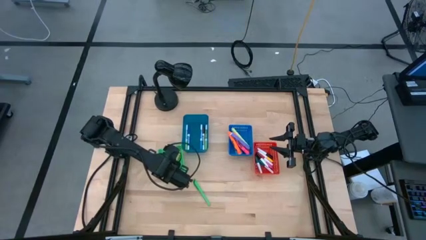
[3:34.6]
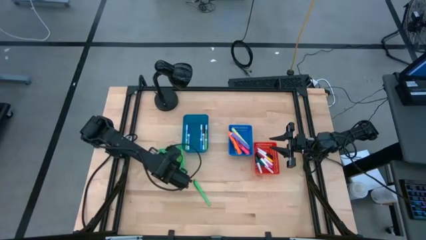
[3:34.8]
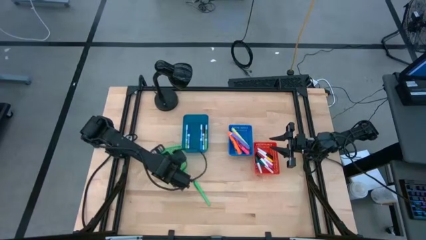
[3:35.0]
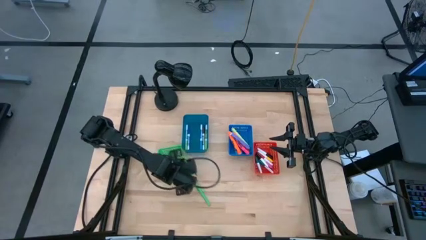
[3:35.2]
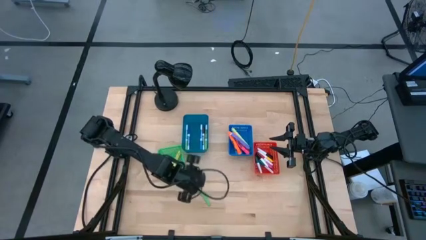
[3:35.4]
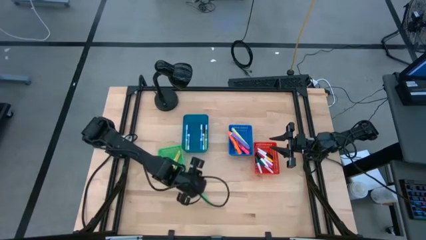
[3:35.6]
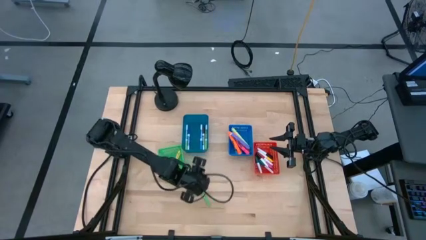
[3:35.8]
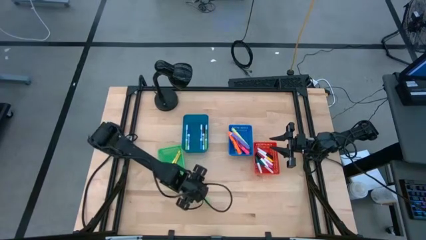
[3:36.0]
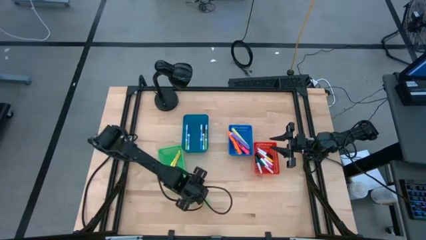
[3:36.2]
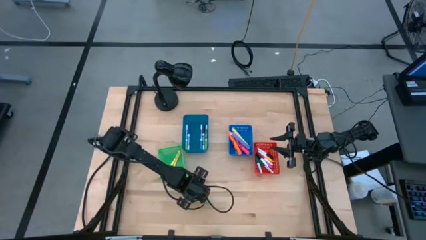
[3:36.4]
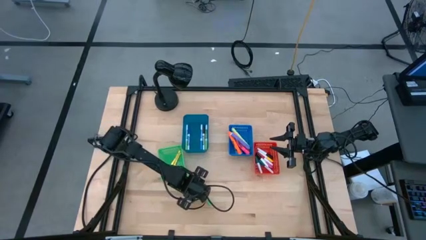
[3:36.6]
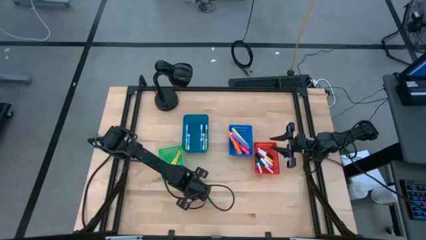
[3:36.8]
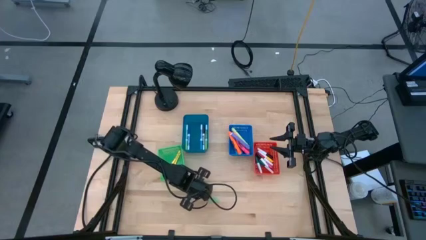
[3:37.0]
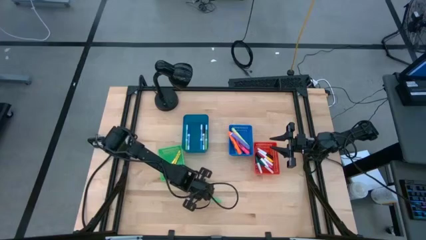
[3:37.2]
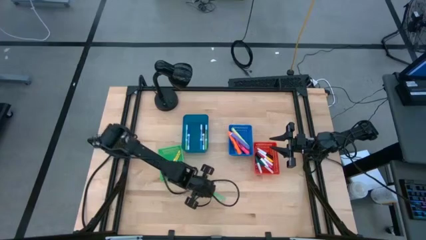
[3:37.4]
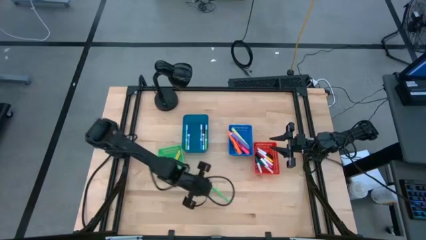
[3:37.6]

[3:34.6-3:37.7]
Task: Pick & Place Markers
Put the green pen into the green bin

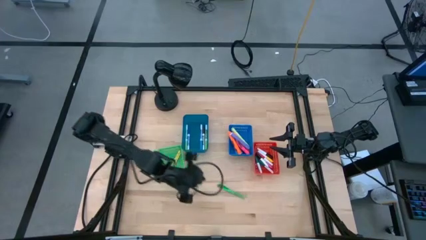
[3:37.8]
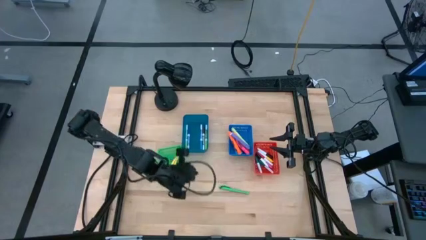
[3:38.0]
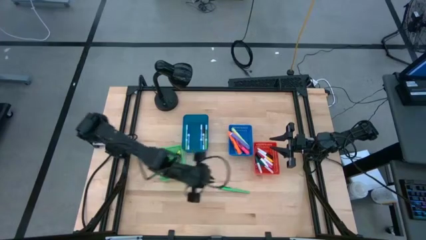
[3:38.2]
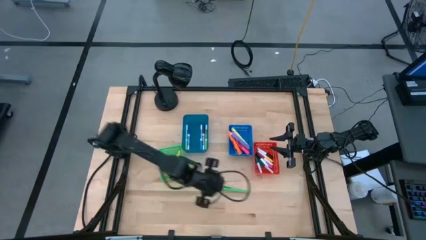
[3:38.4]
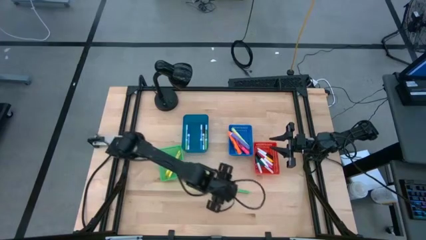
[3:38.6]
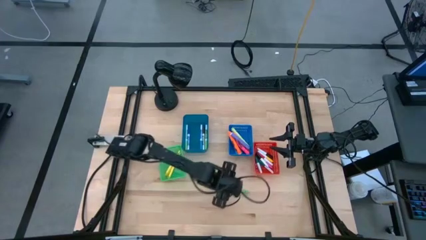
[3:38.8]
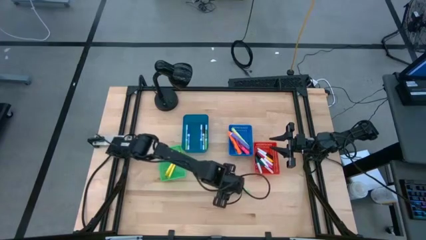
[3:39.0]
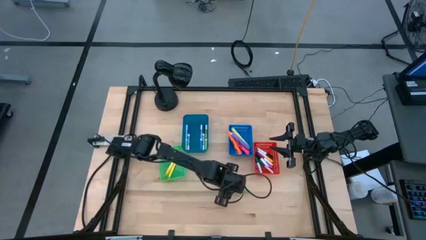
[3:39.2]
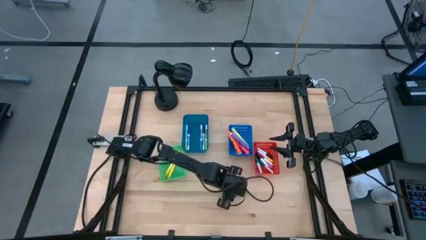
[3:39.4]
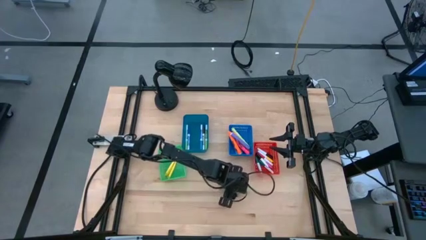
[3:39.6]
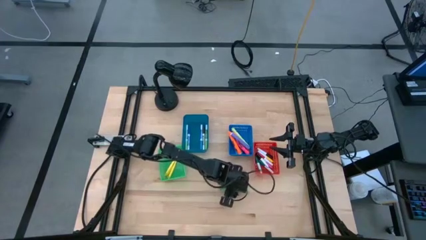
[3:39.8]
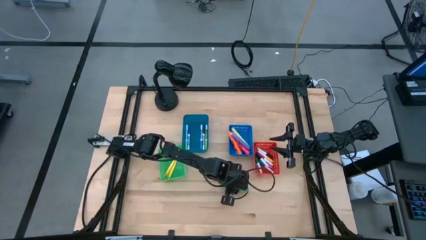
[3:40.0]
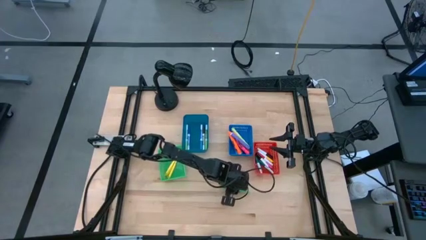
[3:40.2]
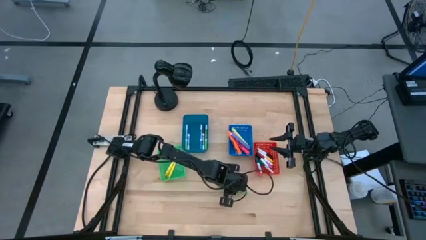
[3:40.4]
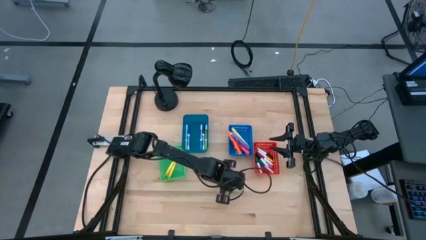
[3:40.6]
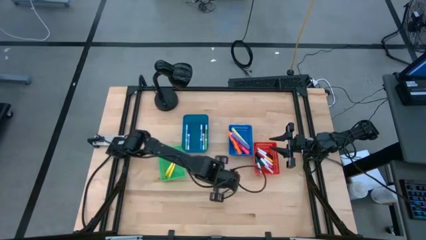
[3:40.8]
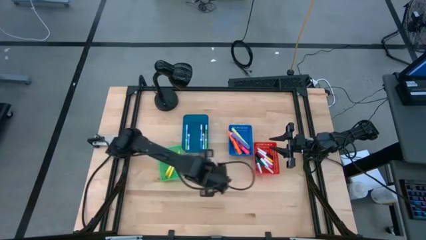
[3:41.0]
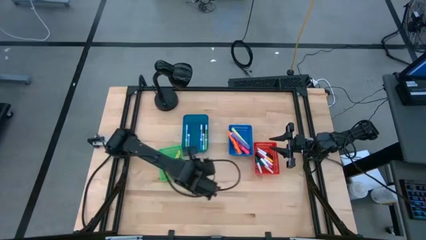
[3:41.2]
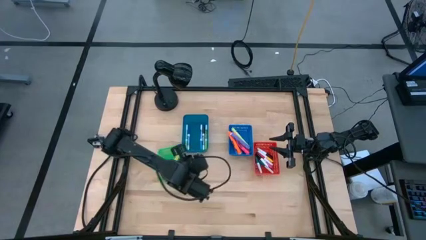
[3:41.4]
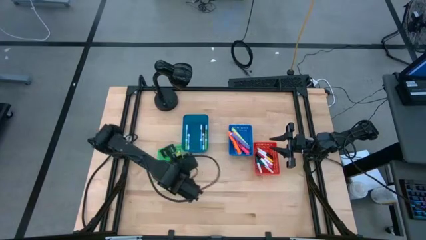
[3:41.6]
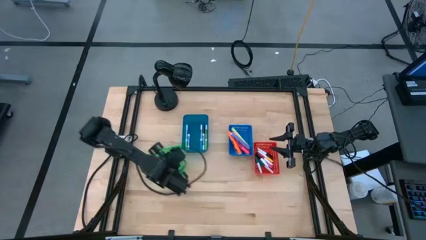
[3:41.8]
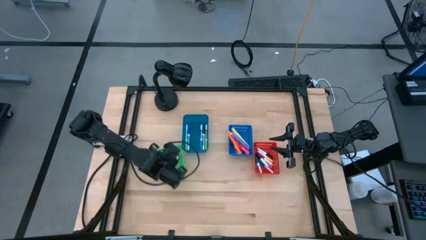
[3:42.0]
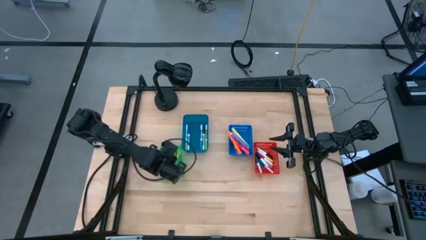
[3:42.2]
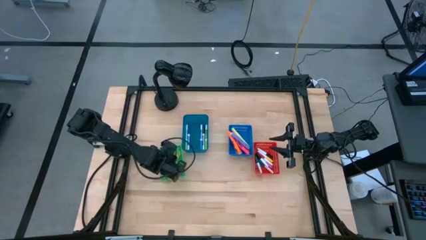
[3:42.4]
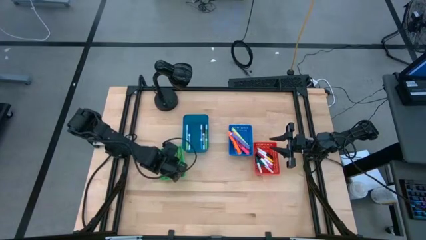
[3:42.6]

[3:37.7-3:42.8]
Put the green pen into the green bin

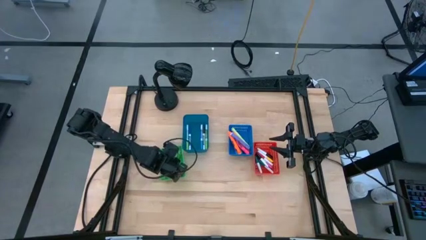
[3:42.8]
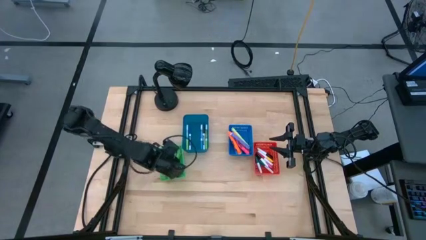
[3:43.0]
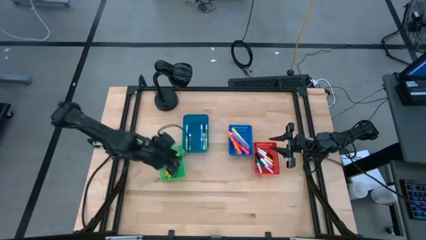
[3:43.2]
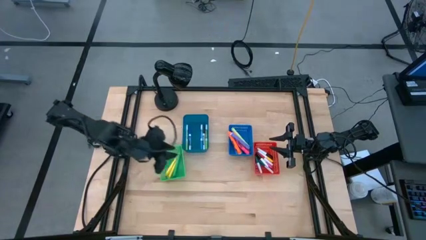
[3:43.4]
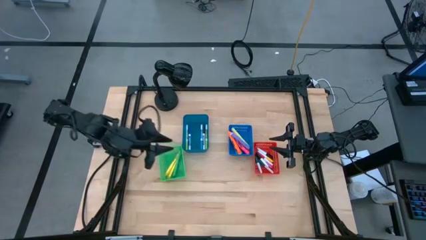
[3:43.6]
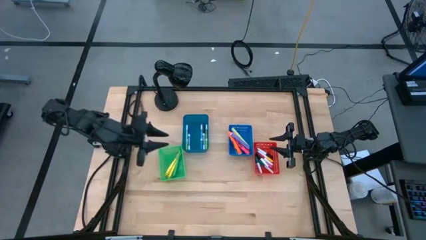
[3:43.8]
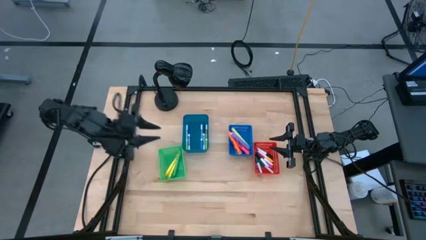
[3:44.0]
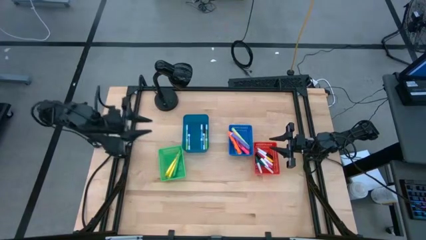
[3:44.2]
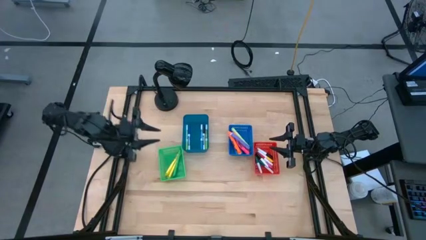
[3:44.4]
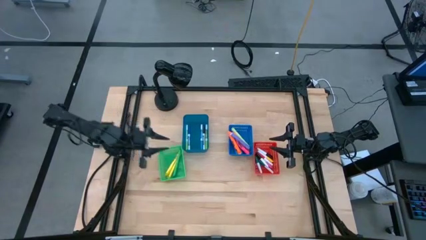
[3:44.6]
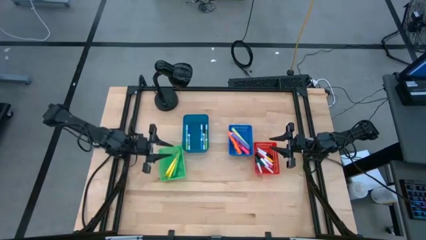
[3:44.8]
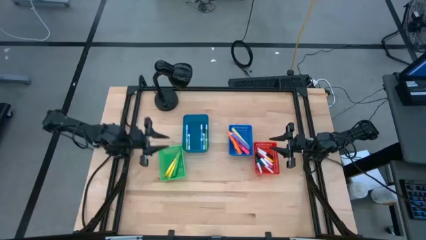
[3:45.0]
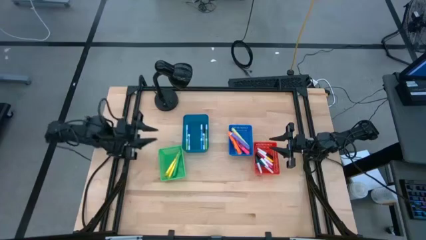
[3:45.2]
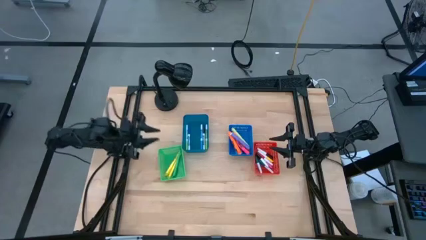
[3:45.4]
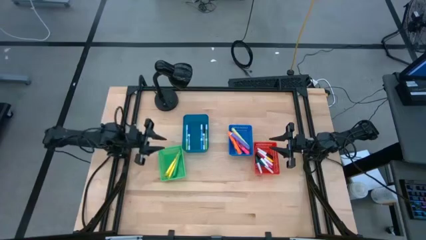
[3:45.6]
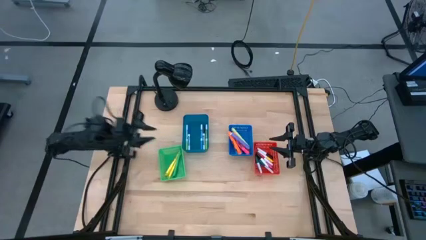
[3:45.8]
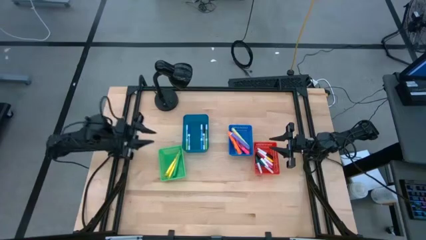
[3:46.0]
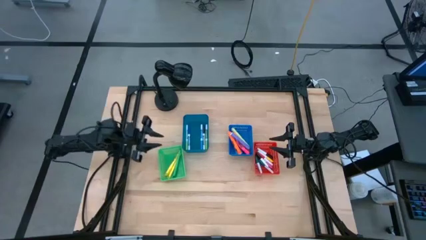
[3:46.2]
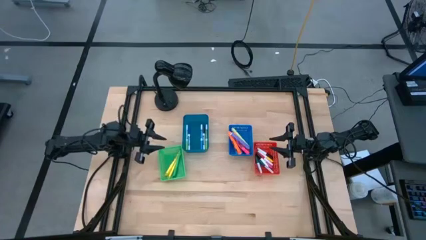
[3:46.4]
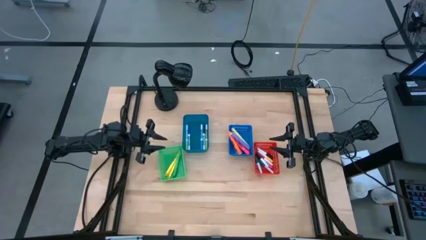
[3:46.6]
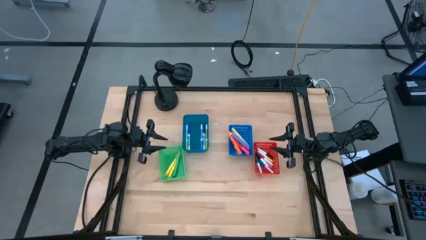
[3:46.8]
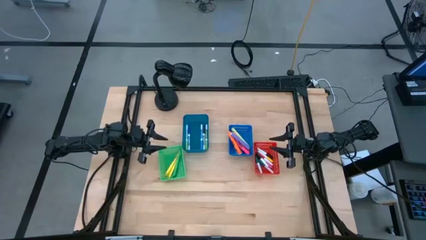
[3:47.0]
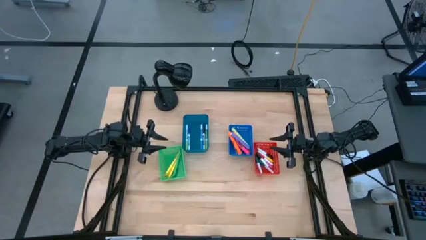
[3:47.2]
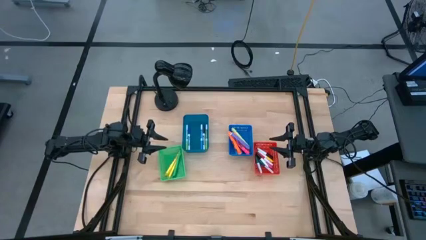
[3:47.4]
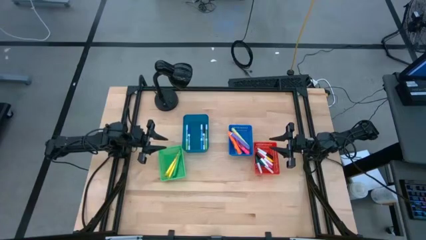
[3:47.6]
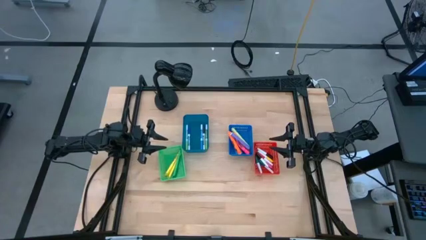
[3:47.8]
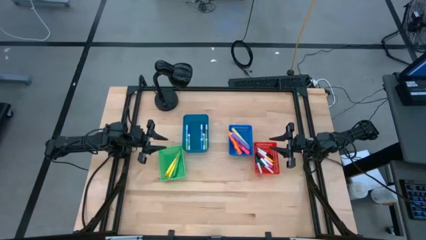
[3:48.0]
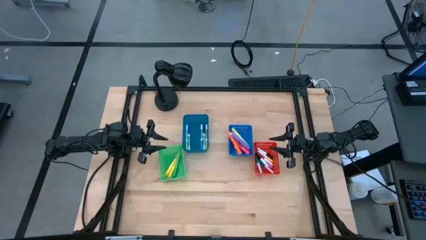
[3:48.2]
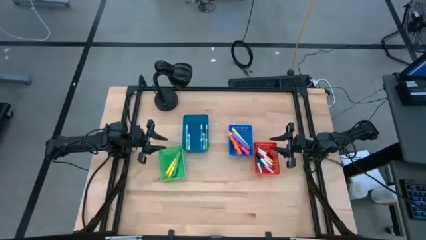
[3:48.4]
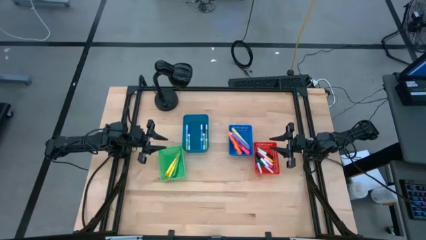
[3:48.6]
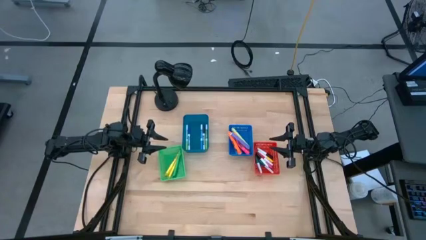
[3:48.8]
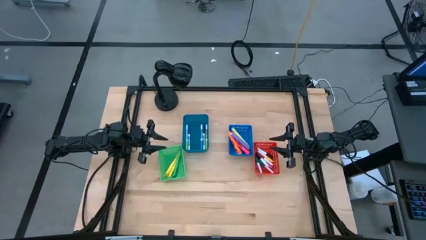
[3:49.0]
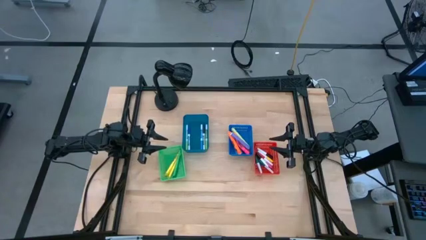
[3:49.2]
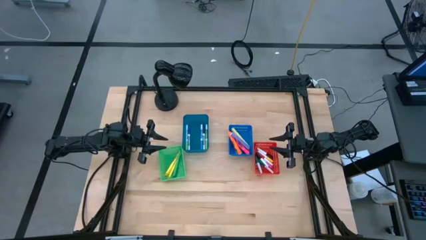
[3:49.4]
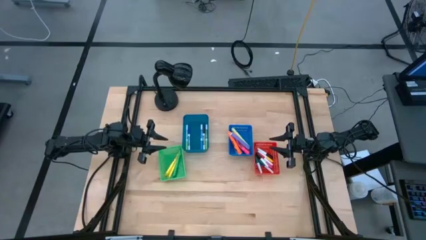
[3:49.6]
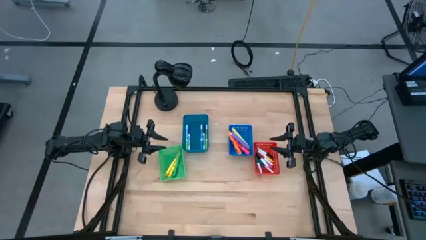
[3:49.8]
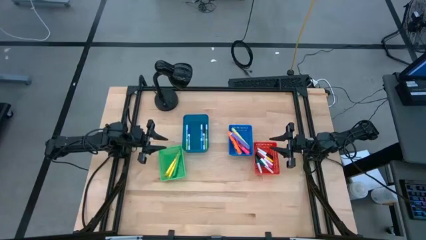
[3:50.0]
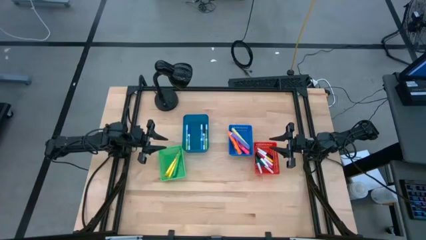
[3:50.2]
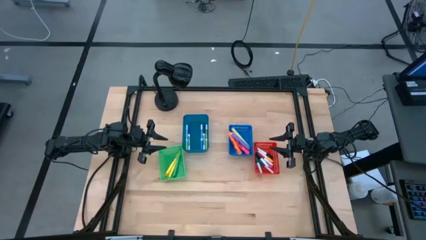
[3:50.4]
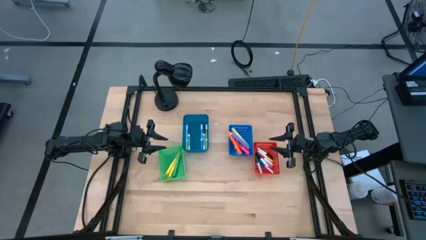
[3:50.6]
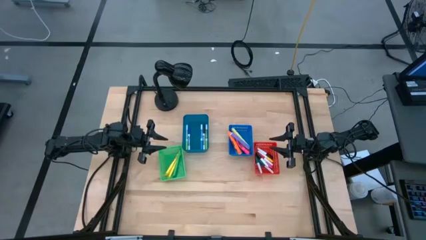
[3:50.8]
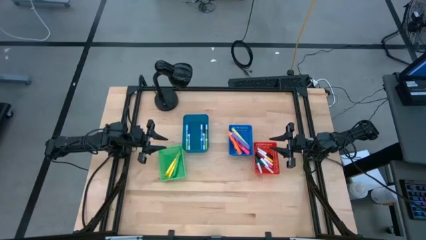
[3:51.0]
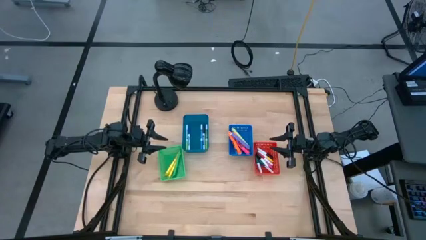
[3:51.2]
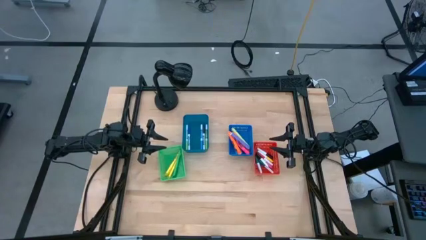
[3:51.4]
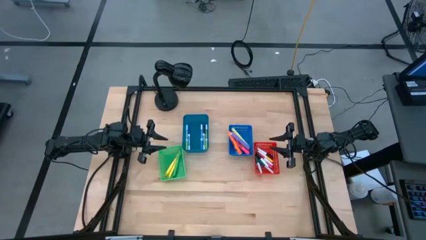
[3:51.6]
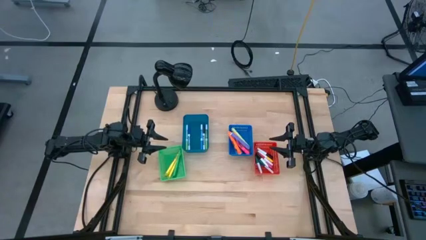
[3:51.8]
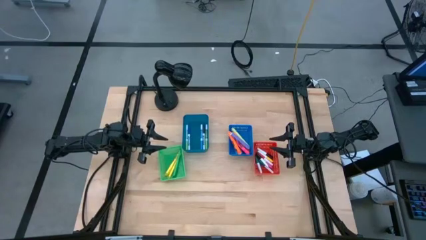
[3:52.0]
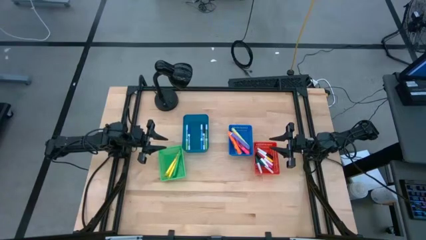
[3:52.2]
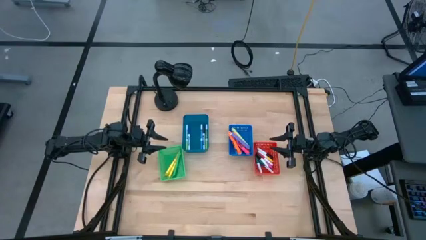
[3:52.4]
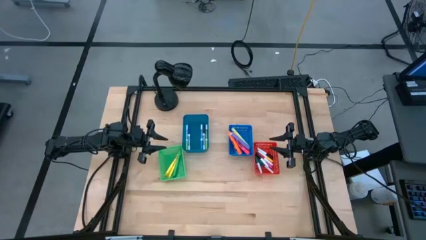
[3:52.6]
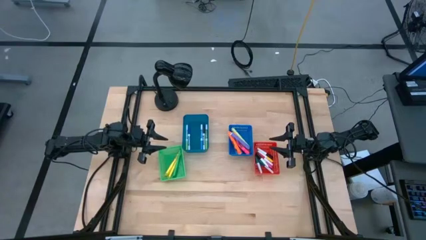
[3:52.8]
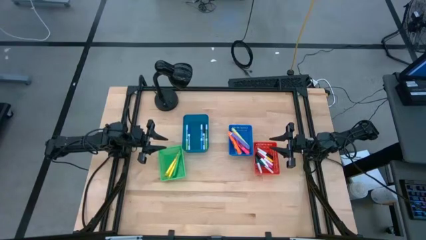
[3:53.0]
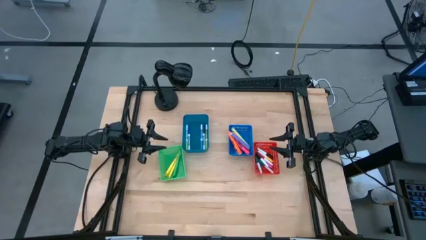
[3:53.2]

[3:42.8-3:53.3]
Return to Home Position
